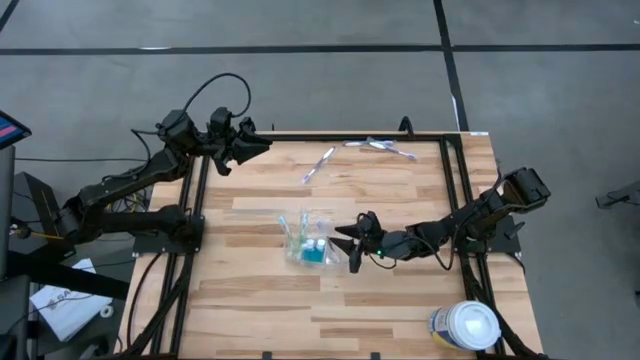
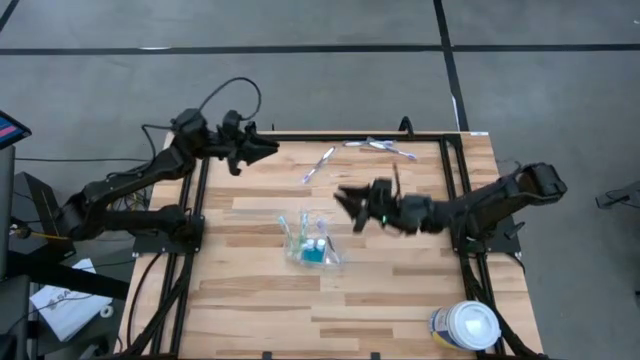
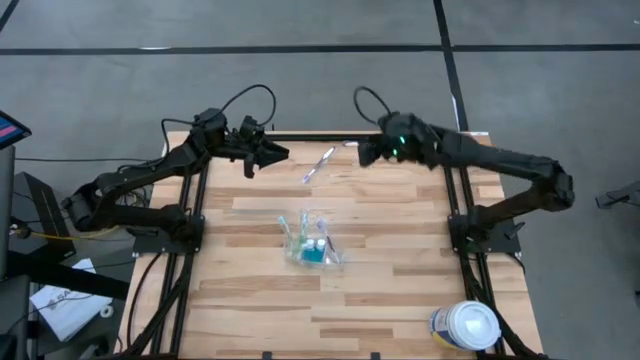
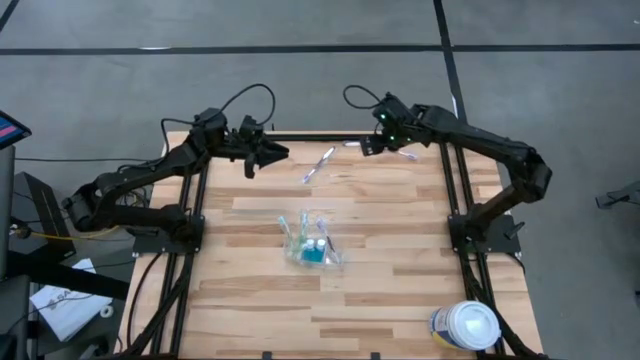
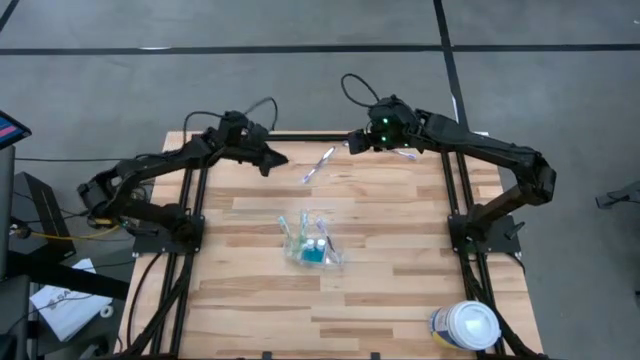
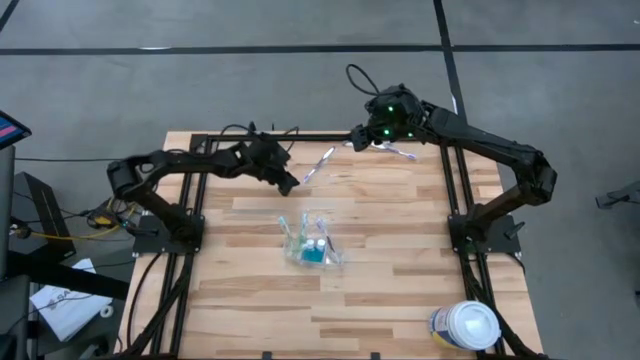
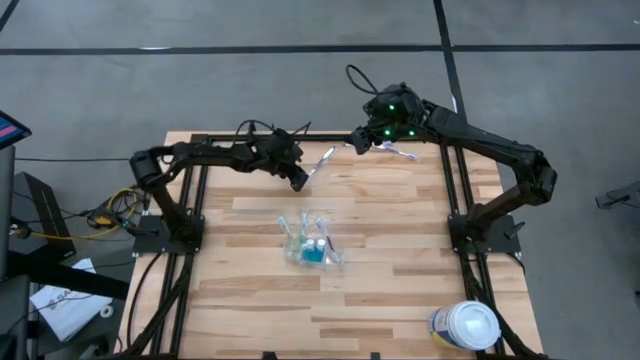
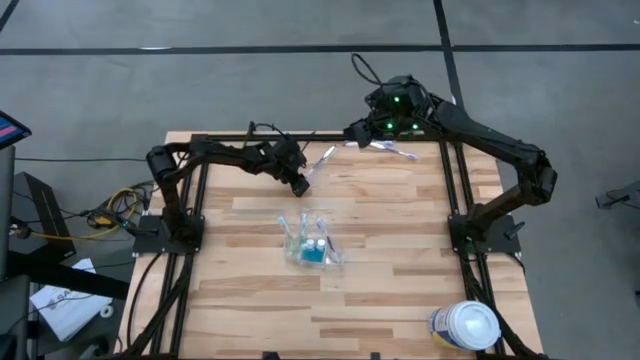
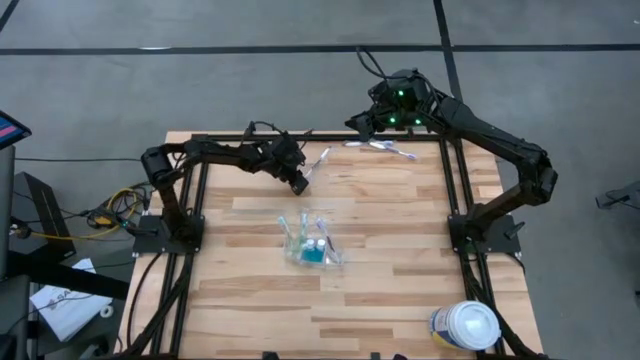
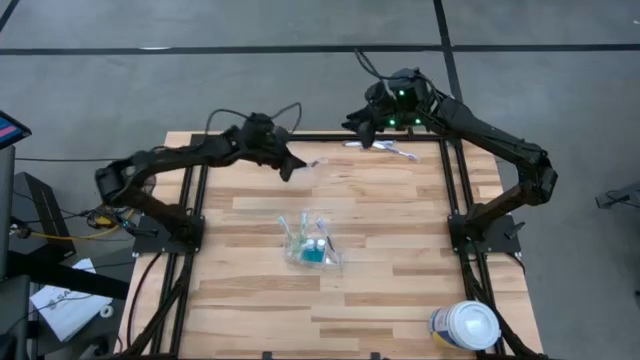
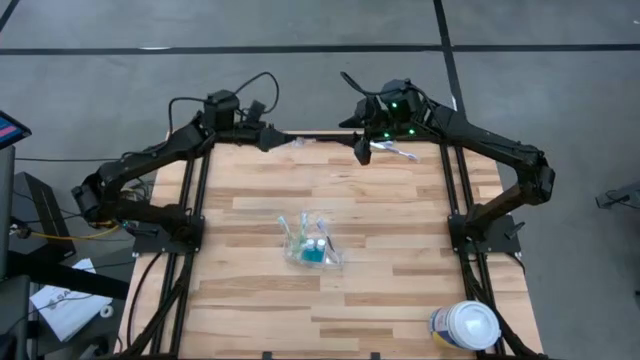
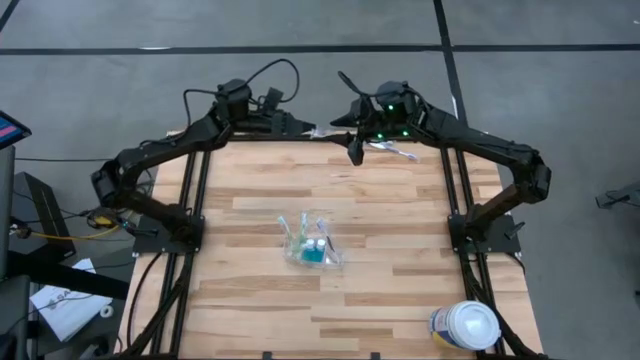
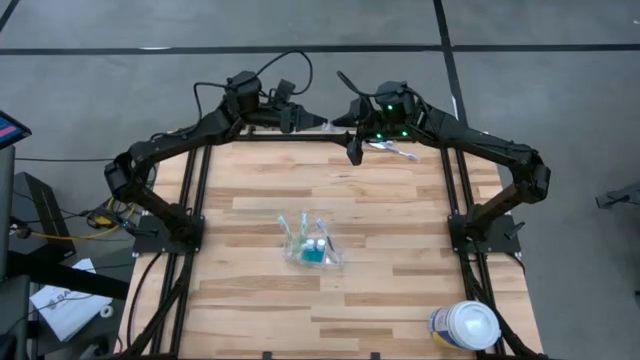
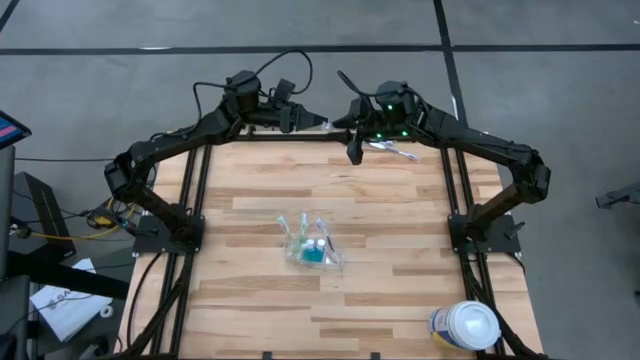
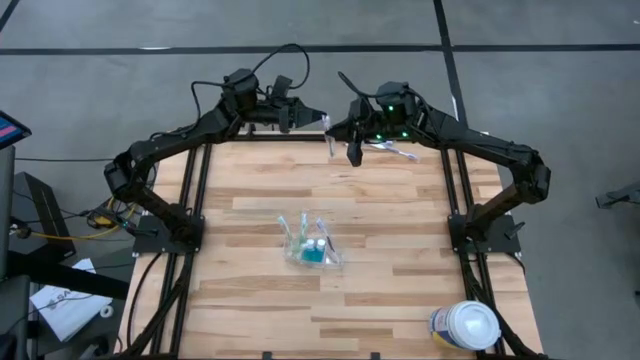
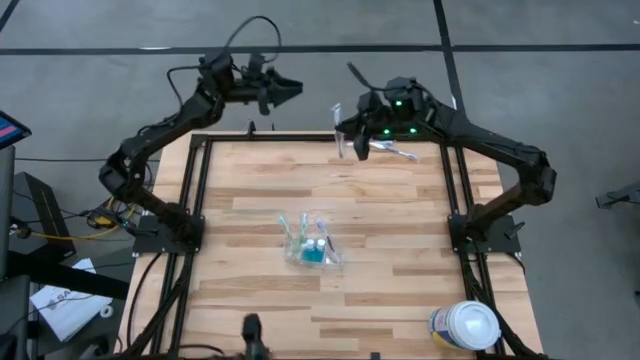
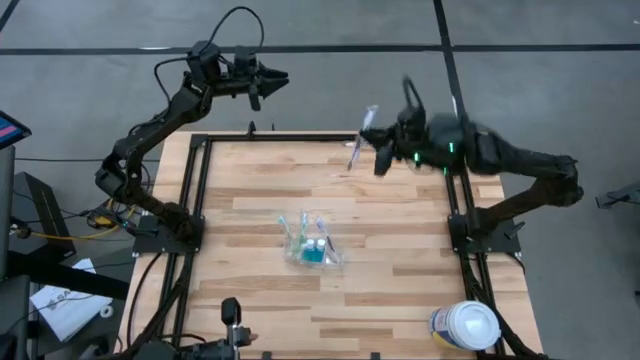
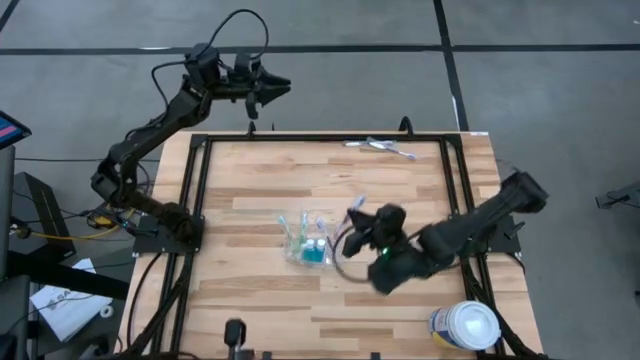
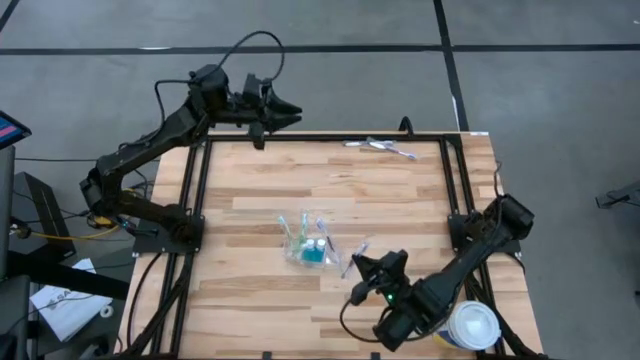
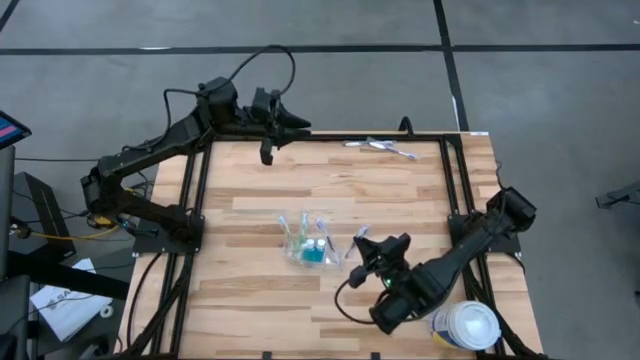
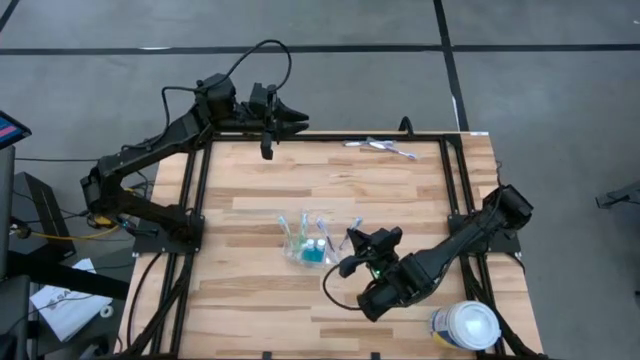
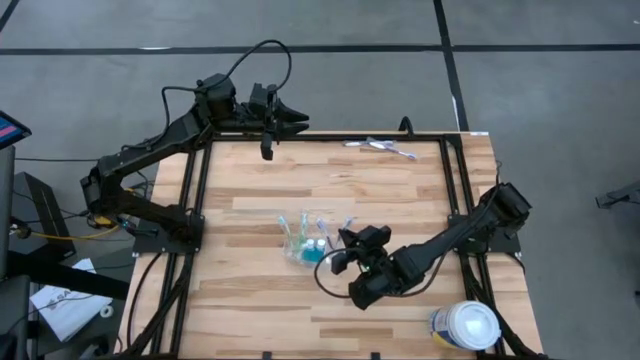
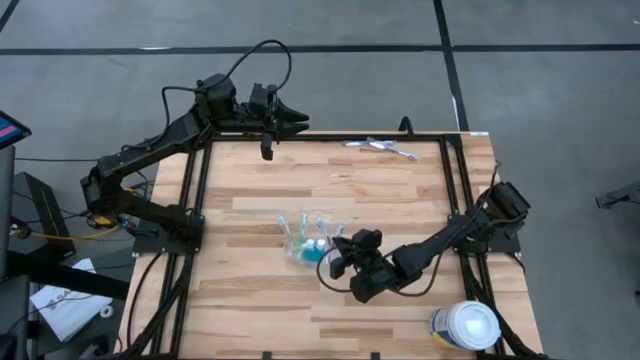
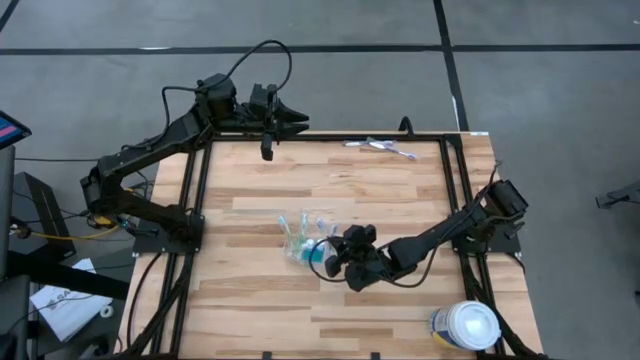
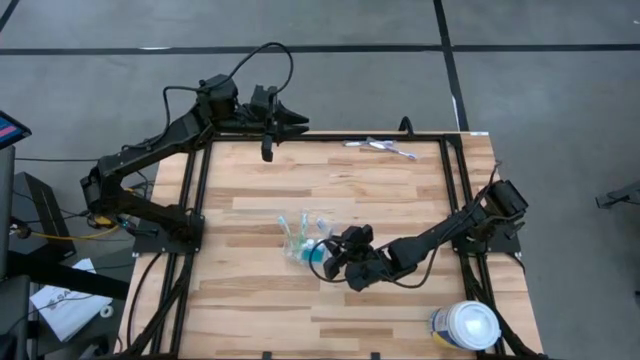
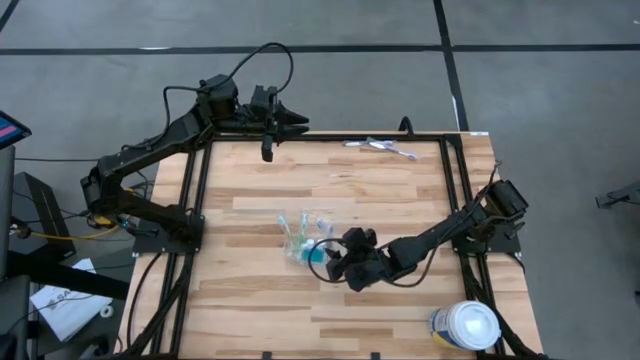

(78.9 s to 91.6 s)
Task: Pick & Place toothbrushing station
Put the purple toothbrush into the transparent organizer

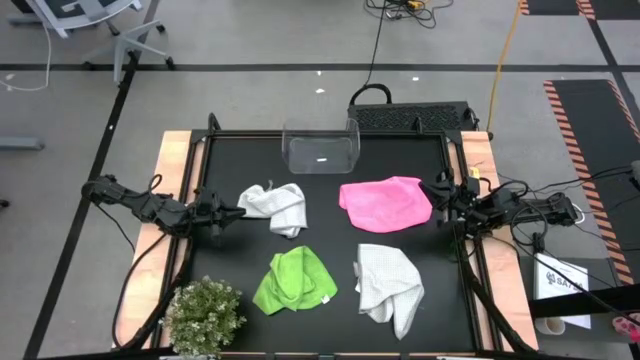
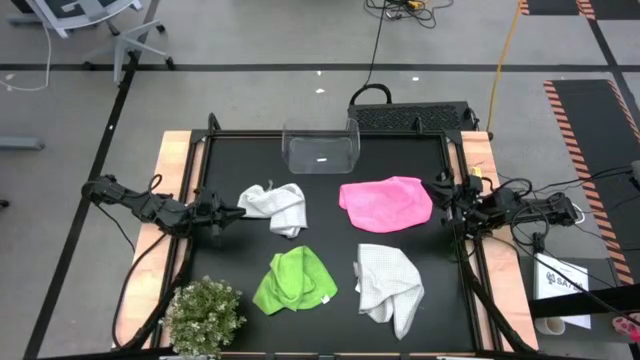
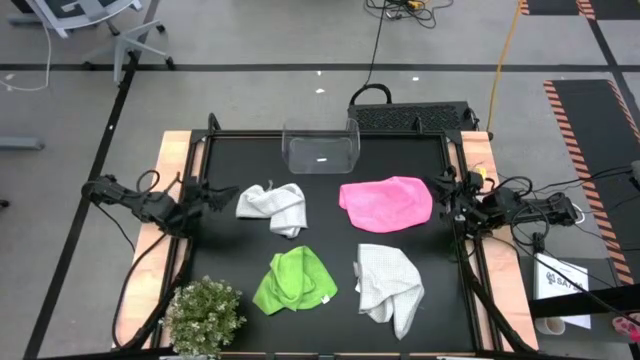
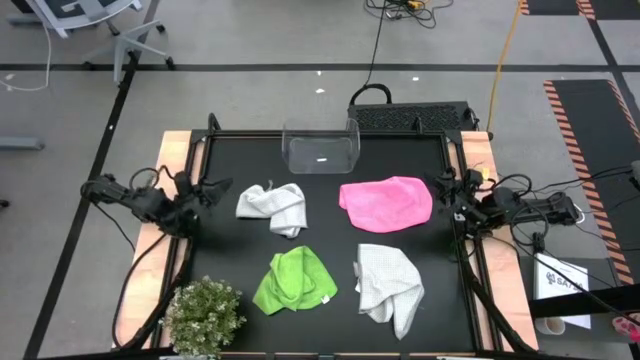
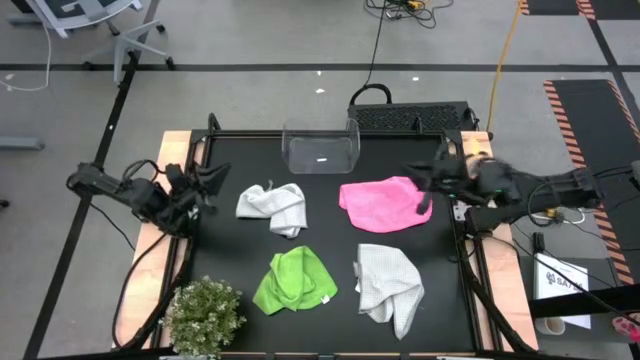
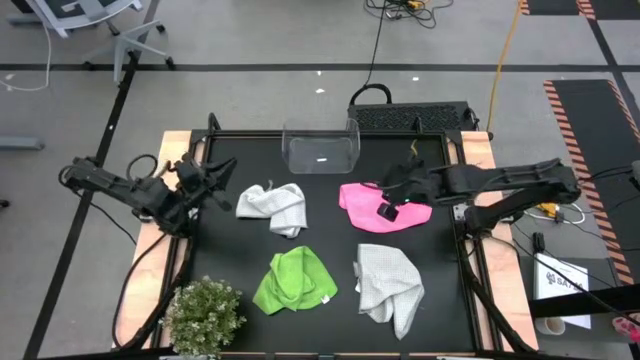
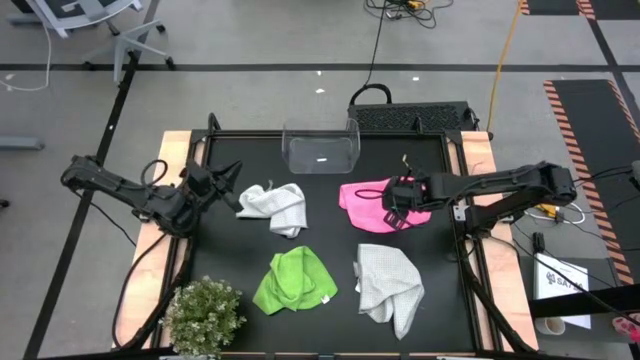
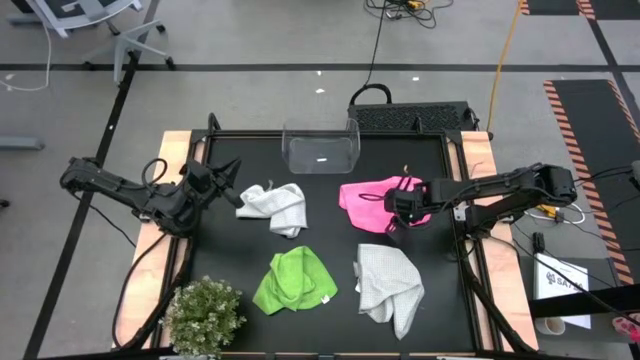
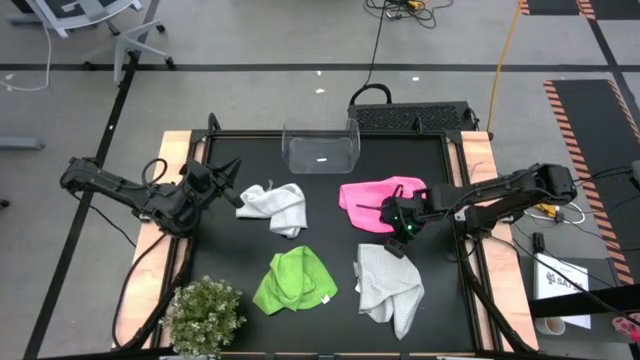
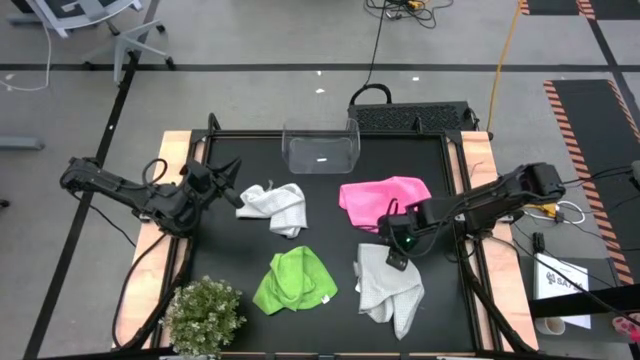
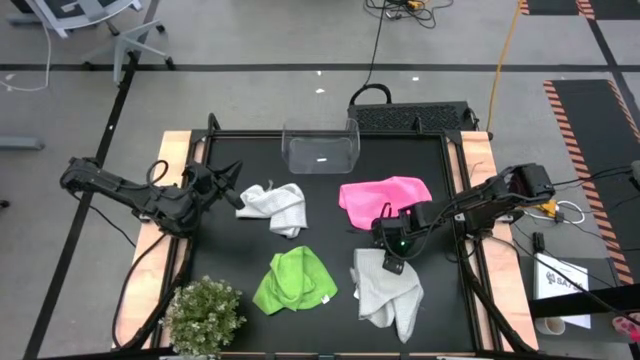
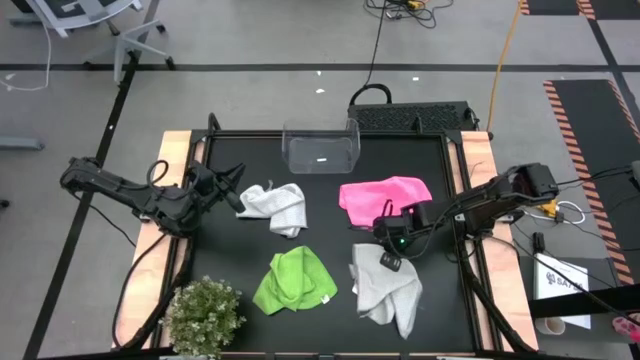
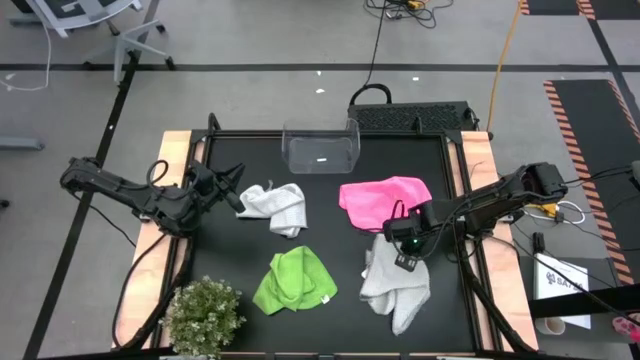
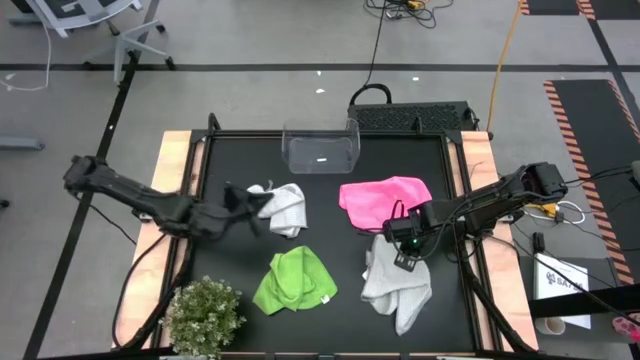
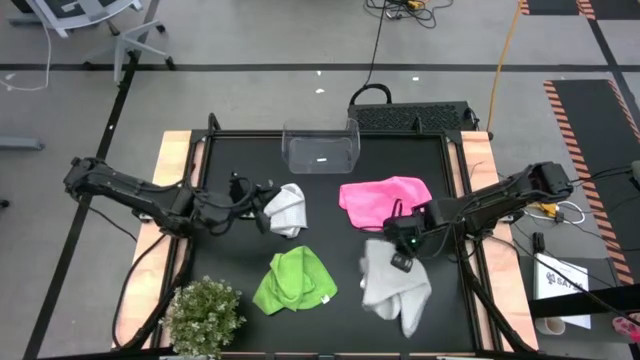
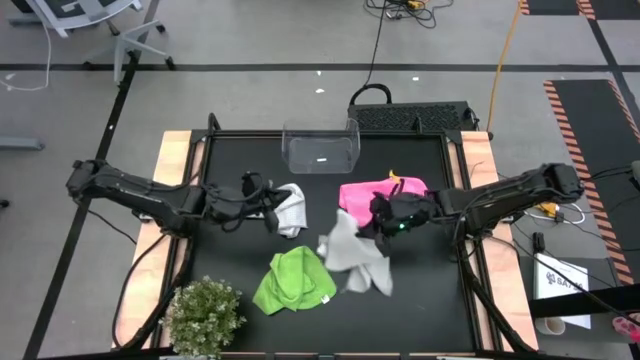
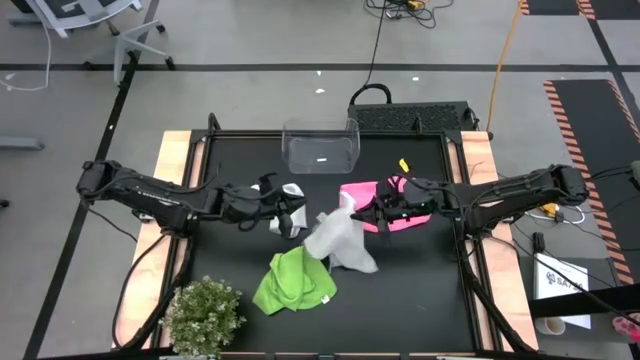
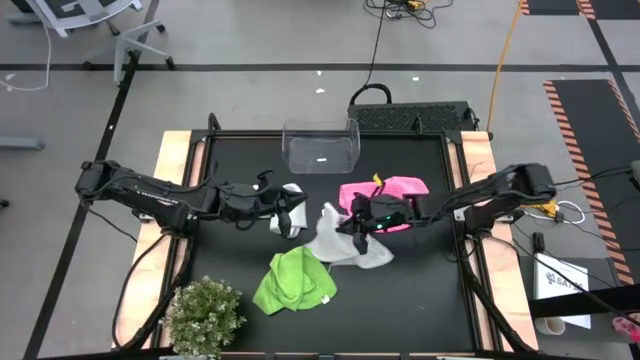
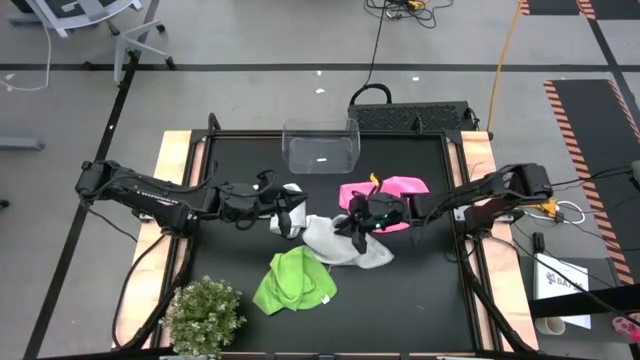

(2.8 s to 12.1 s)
Task: Fold microfiber towels
Adjust the right gray microfiber cloth

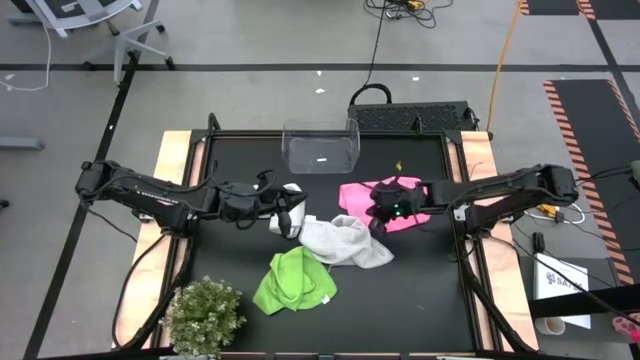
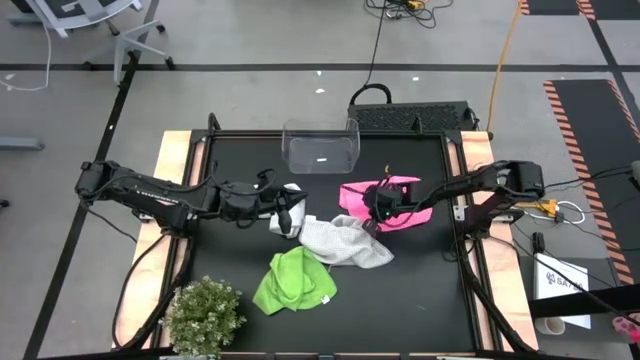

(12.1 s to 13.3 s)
Adjust the pink microfiber cloth
